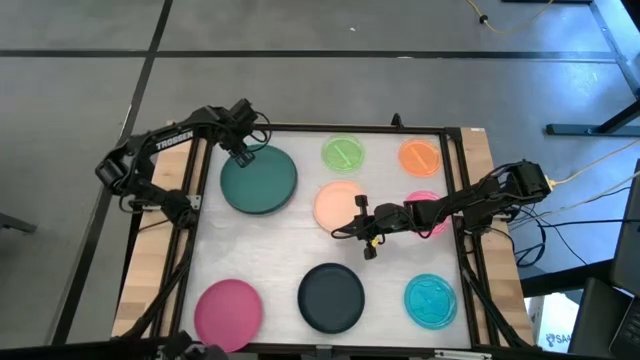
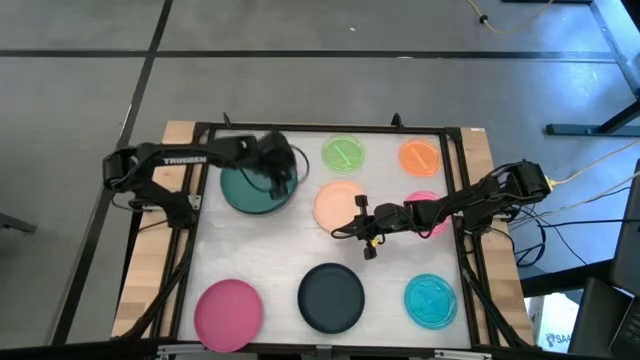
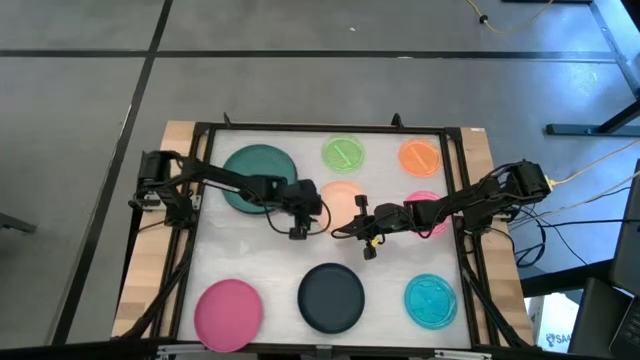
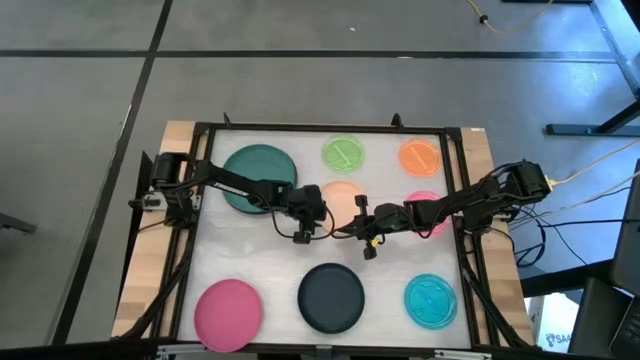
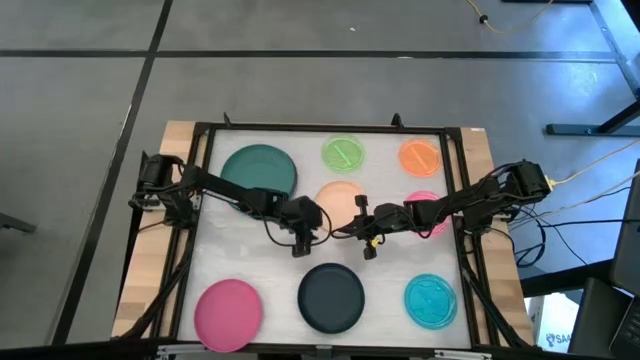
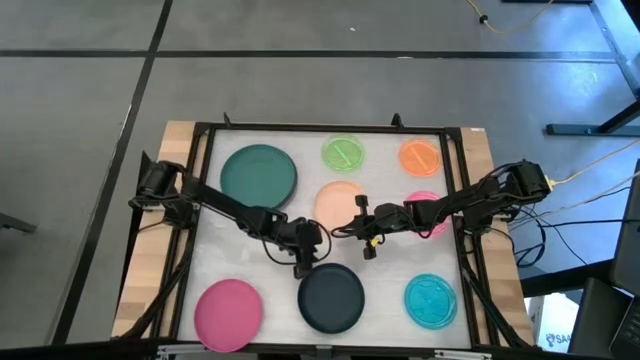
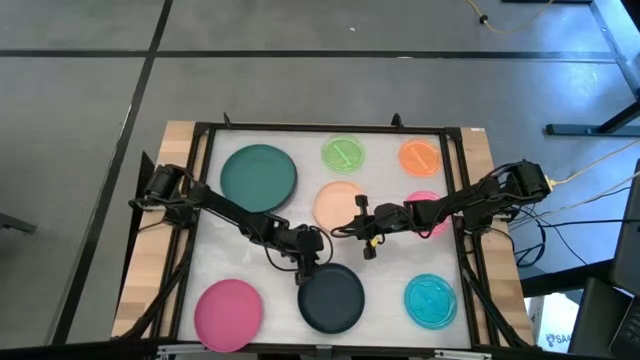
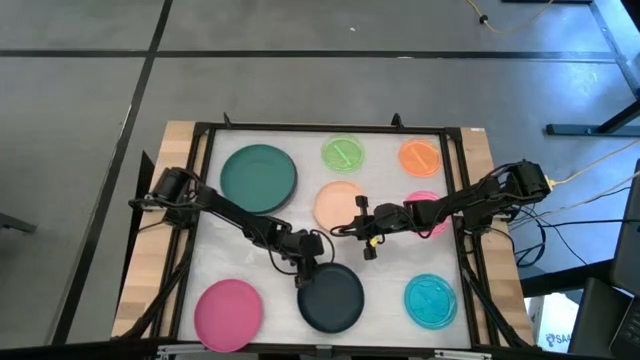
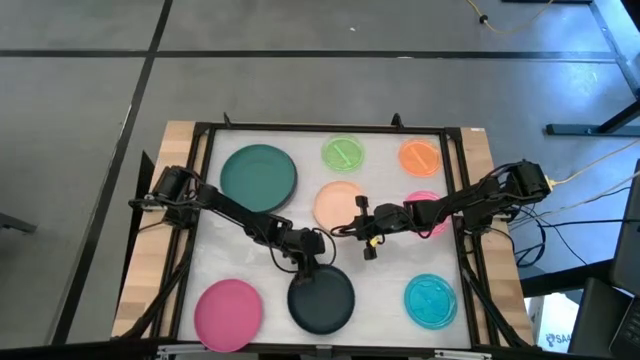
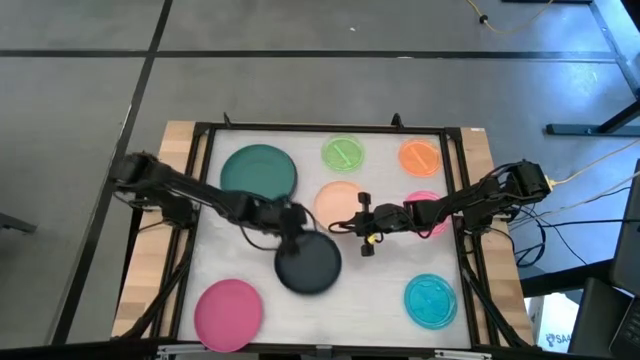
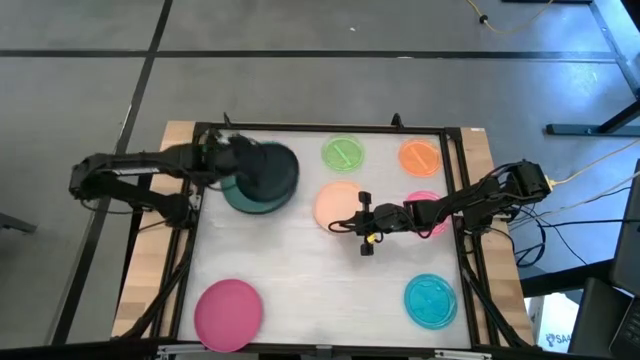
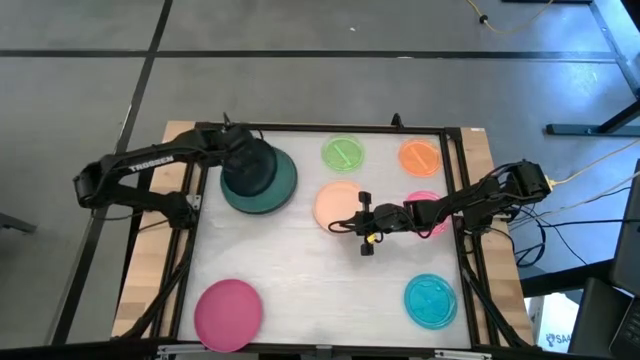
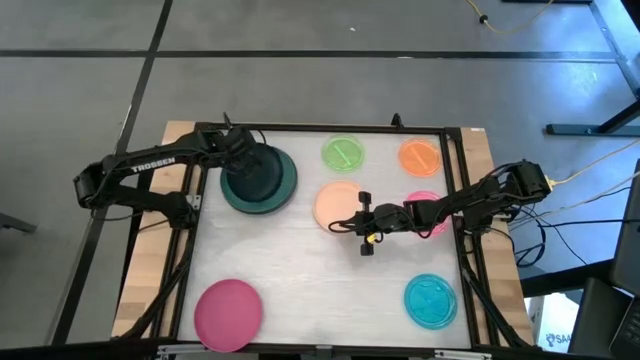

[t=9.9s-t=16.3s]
Task: Stack plastic plates
Stack the black plate on top of the dark green plate

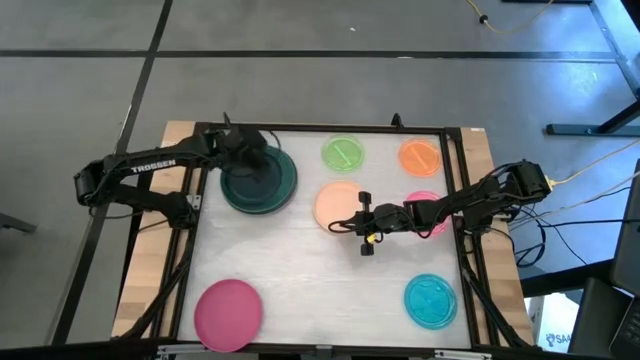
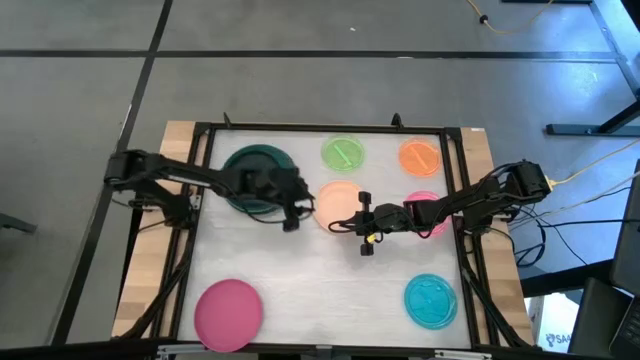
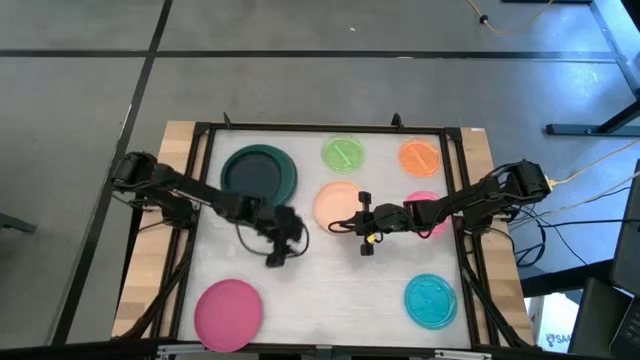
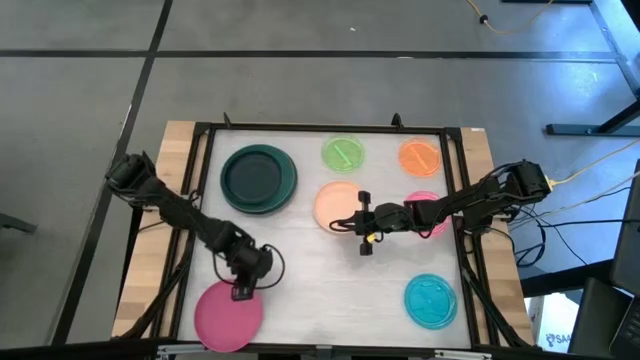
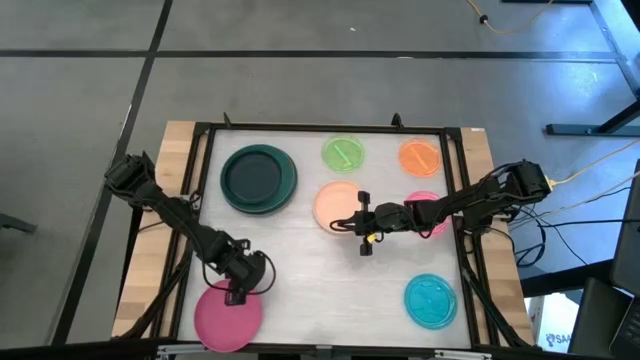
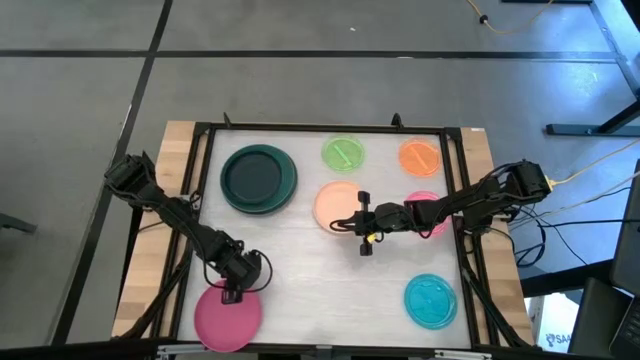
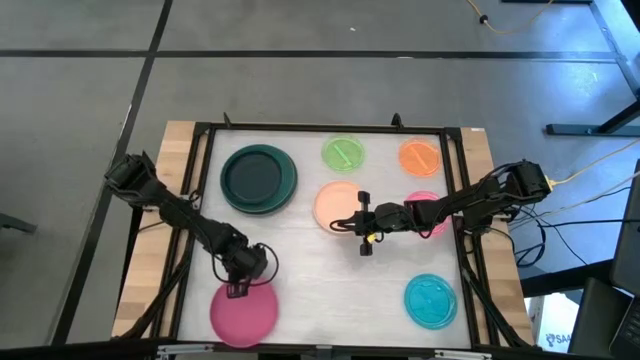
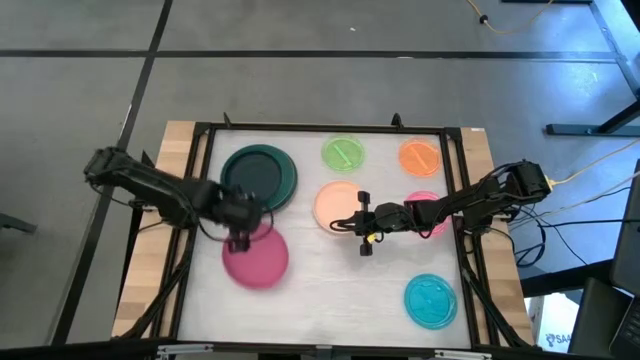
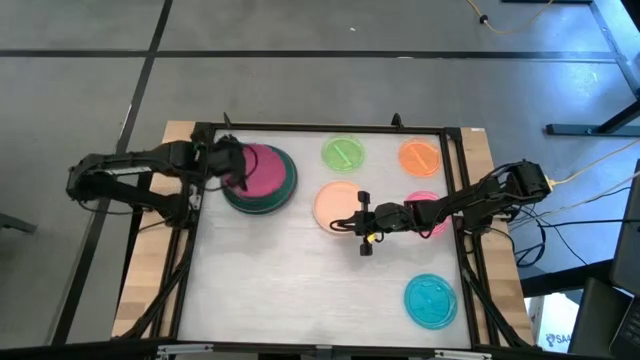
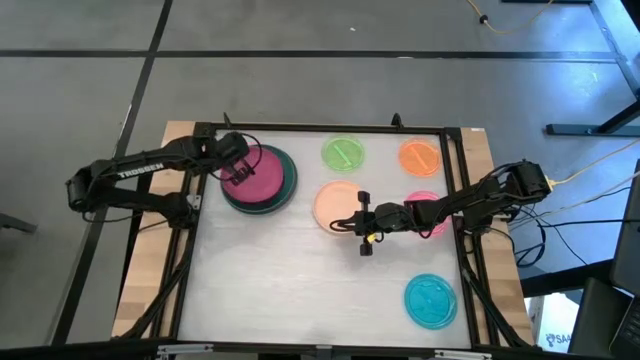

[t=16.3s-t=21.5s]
Stack the pink plate on top of the black plate

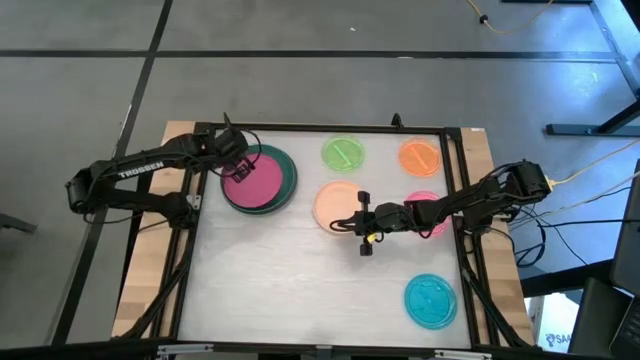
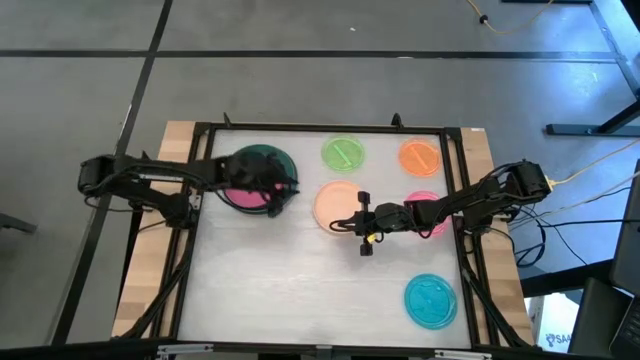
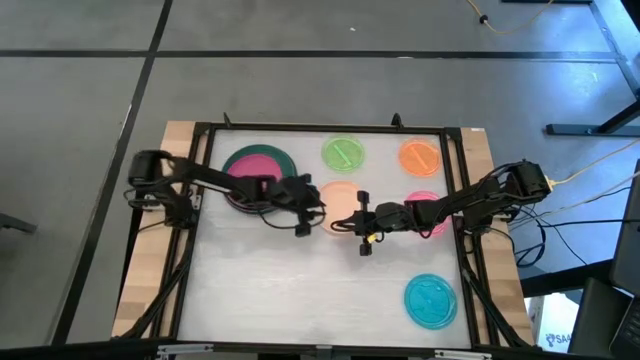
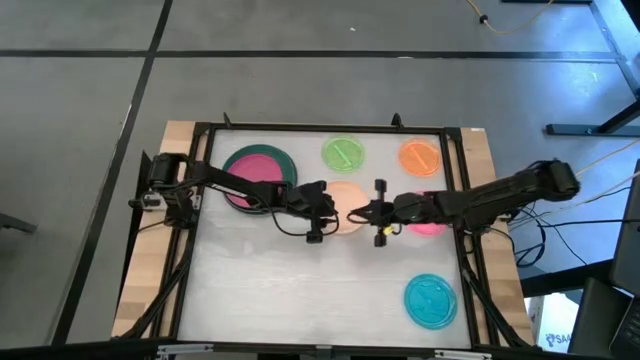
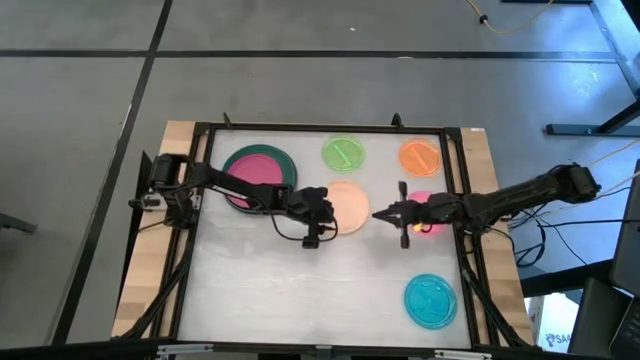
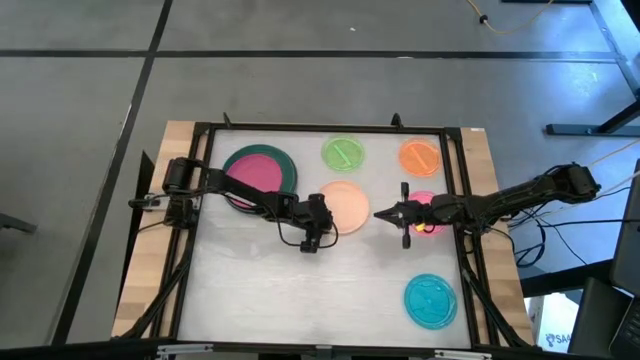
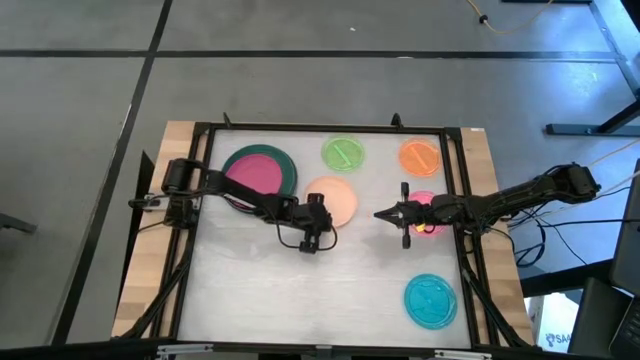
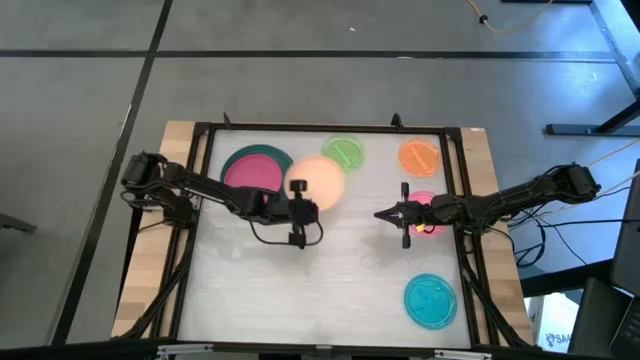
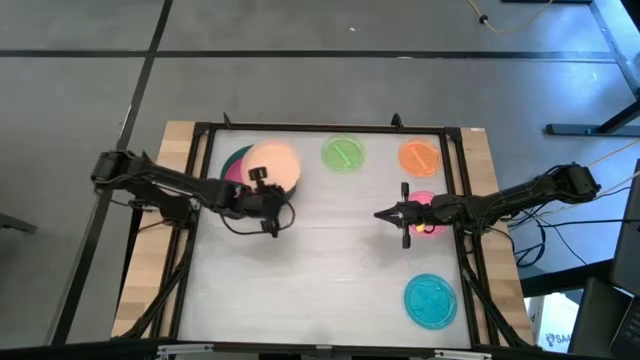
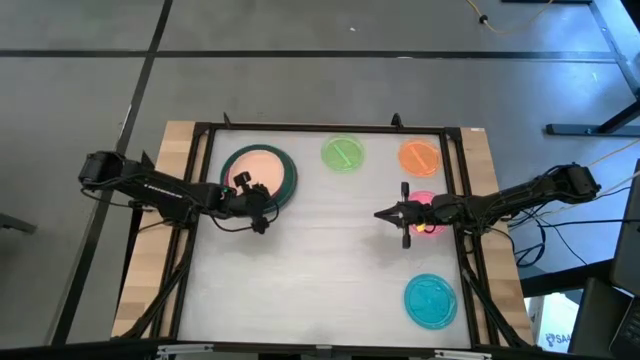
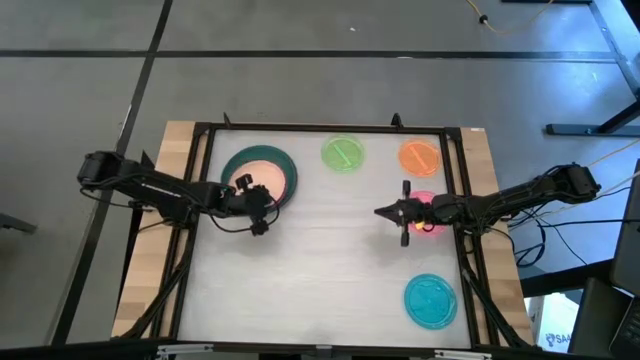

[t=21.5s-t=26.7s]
Stack the light orange plate on top of the pink plate

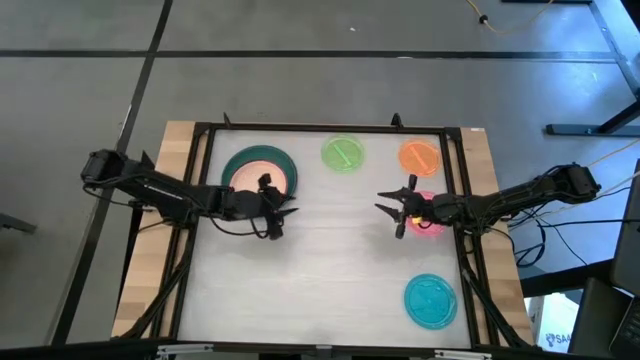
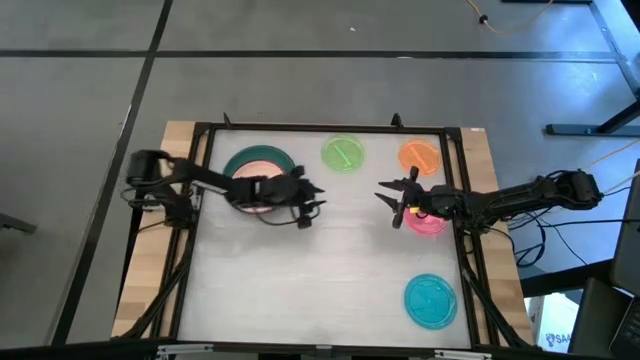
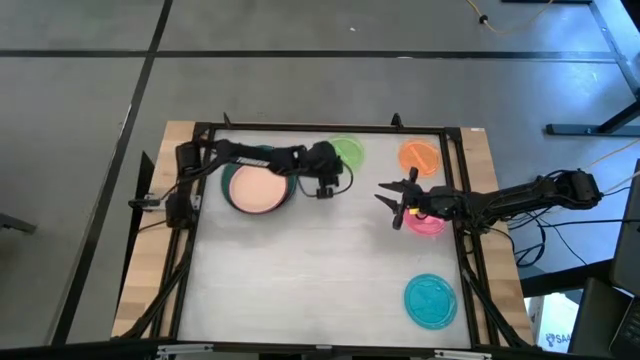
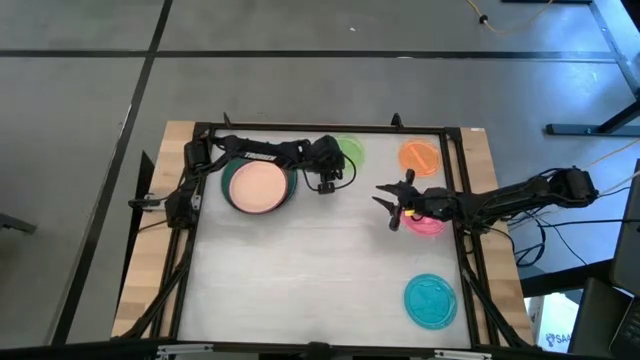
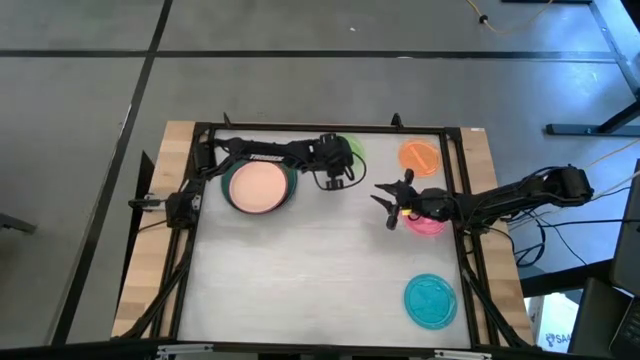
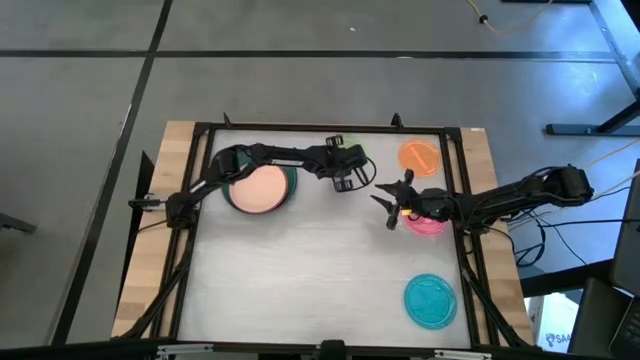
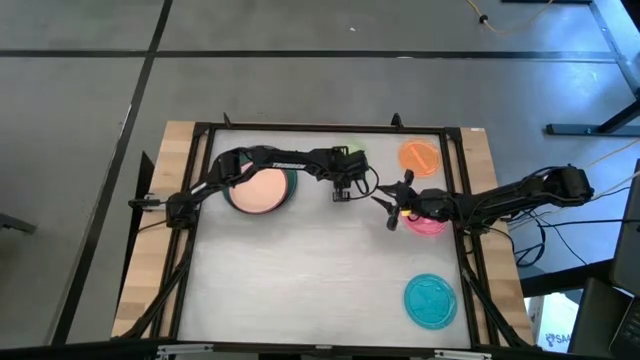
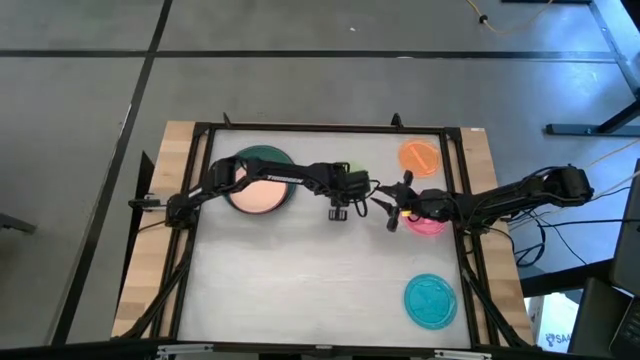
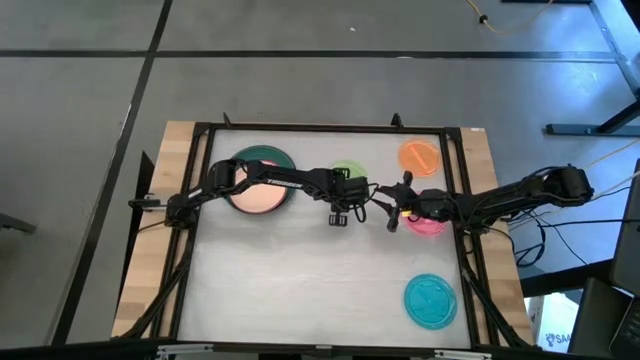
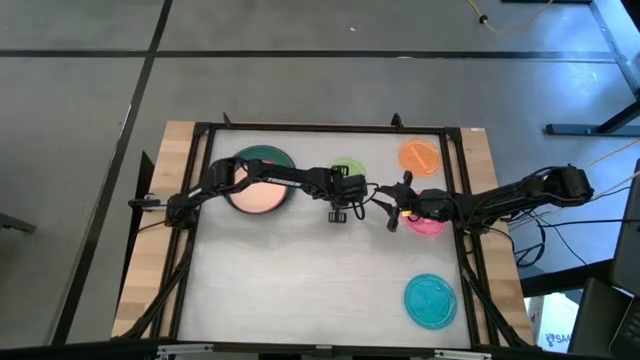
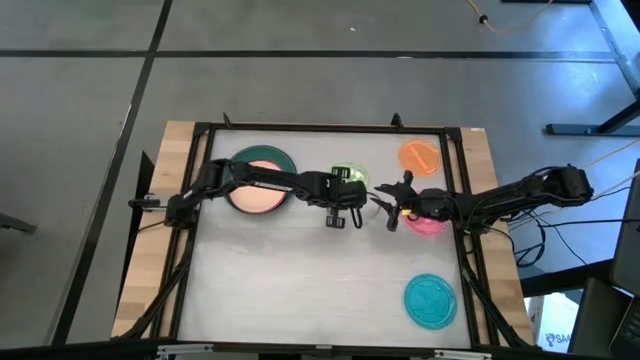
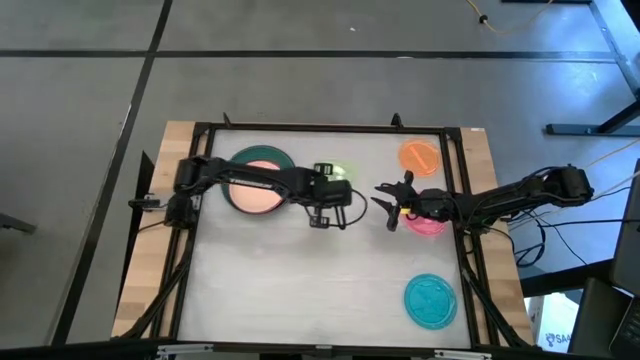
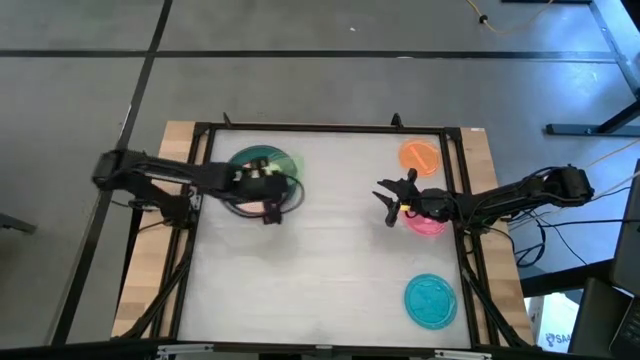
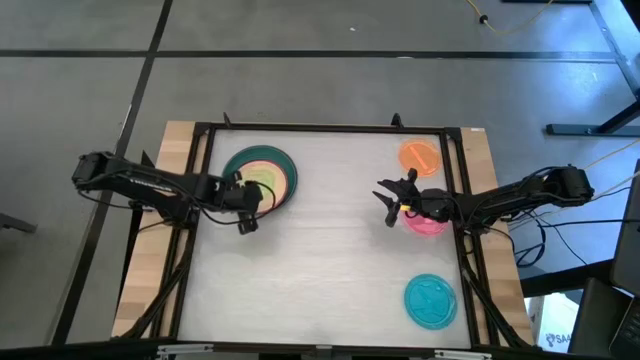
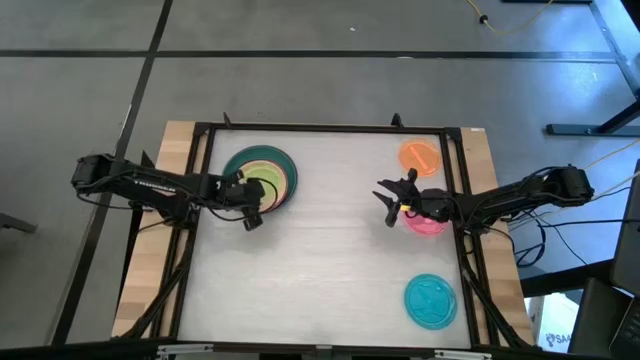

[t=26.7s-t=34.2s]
Stack the green plate on top of the light orange plate
